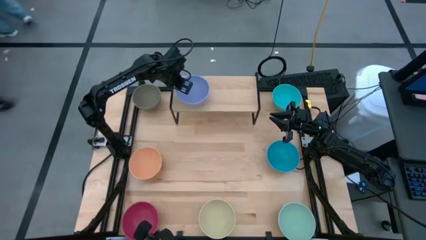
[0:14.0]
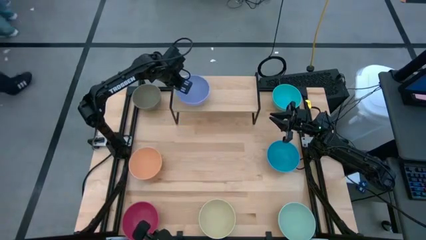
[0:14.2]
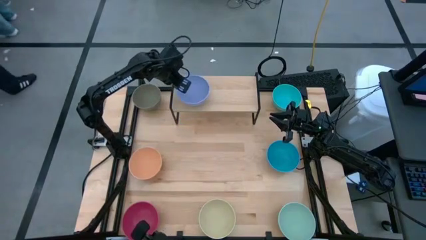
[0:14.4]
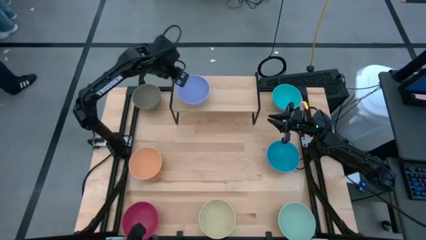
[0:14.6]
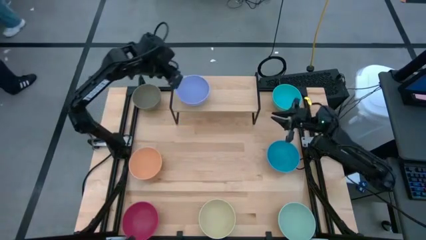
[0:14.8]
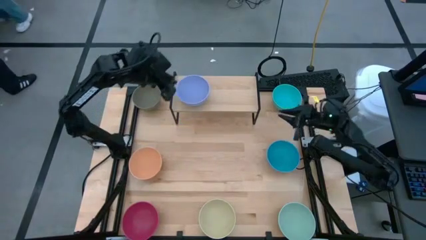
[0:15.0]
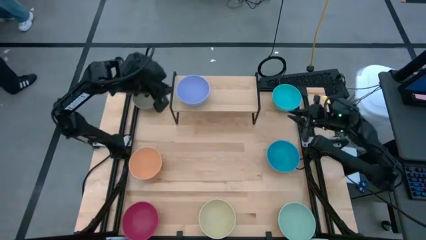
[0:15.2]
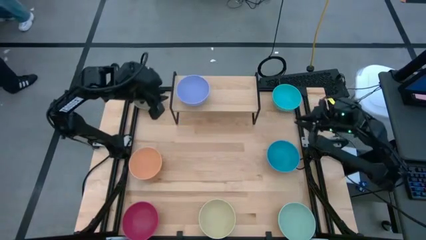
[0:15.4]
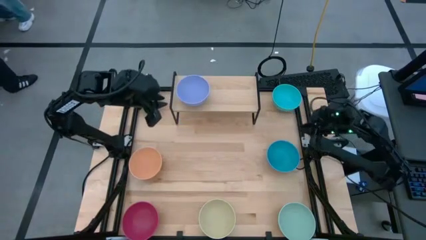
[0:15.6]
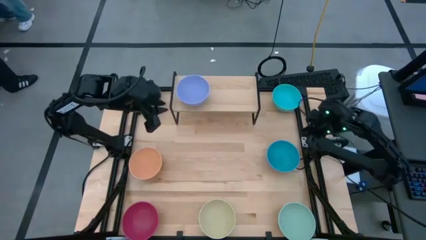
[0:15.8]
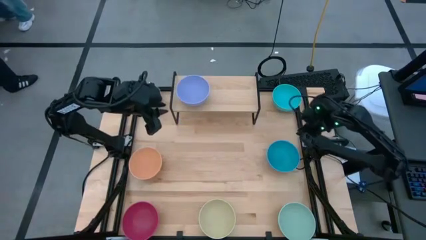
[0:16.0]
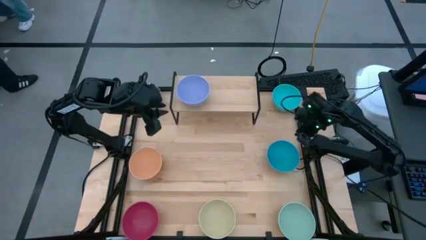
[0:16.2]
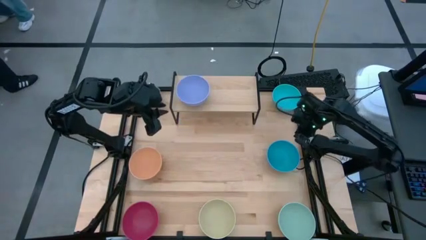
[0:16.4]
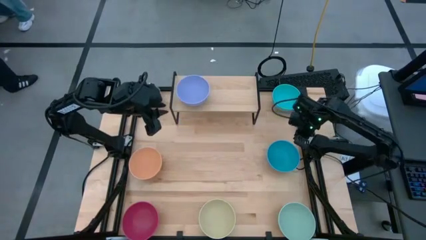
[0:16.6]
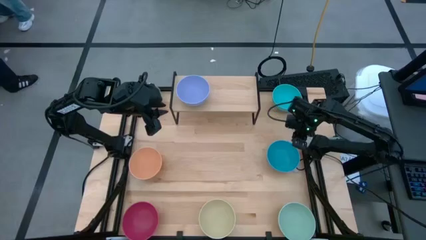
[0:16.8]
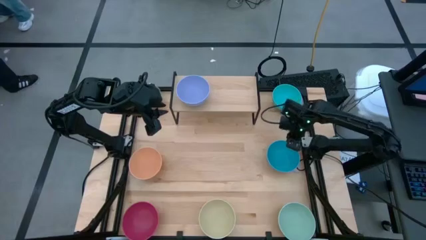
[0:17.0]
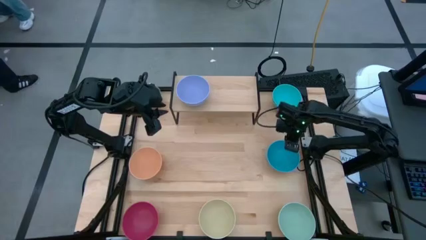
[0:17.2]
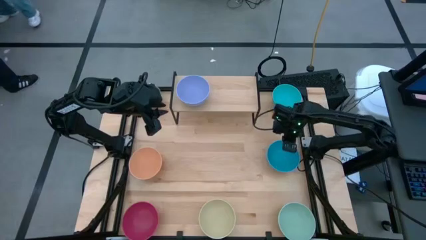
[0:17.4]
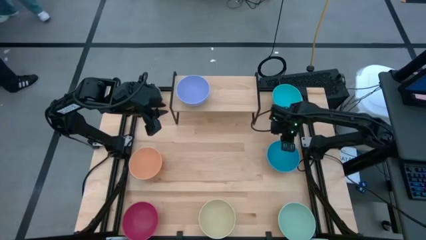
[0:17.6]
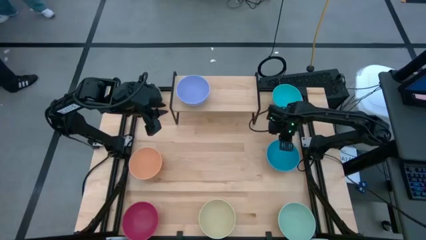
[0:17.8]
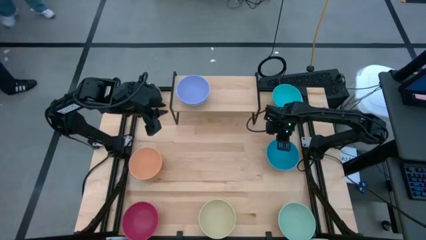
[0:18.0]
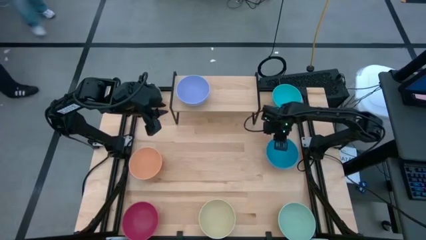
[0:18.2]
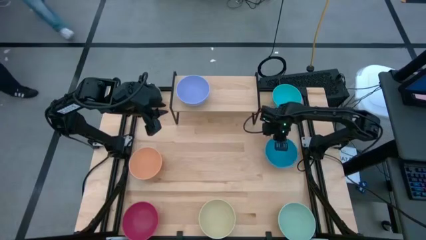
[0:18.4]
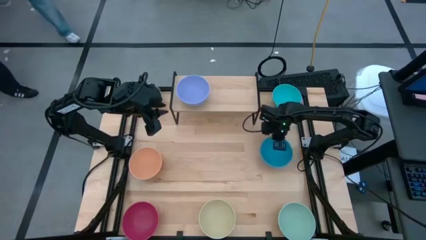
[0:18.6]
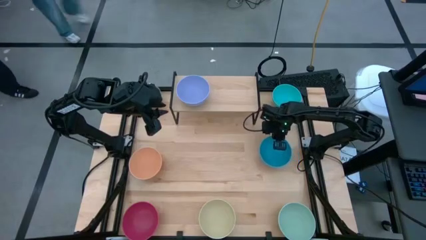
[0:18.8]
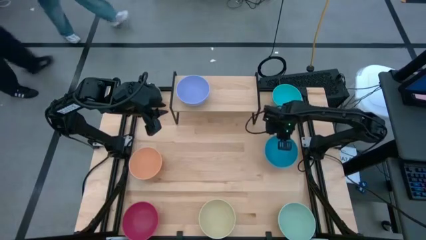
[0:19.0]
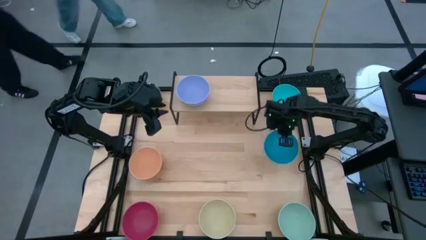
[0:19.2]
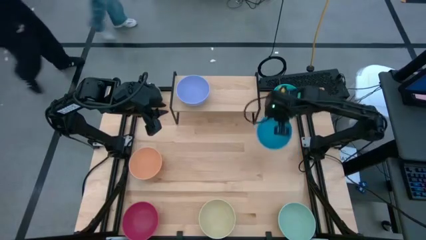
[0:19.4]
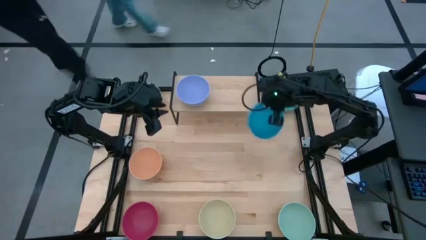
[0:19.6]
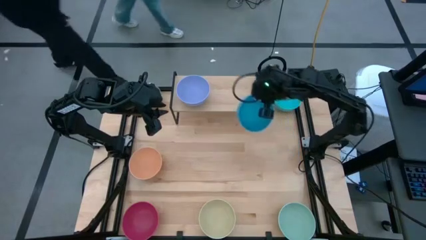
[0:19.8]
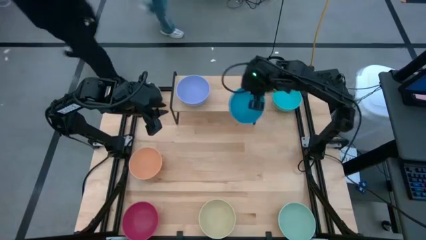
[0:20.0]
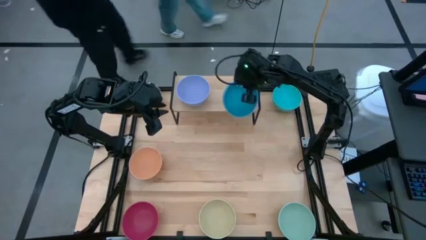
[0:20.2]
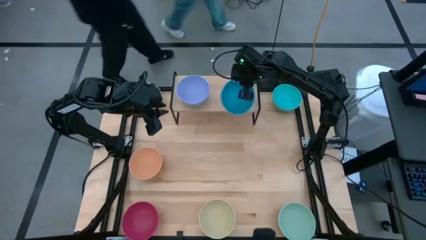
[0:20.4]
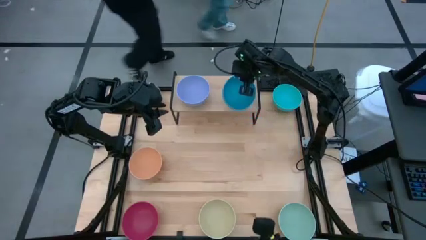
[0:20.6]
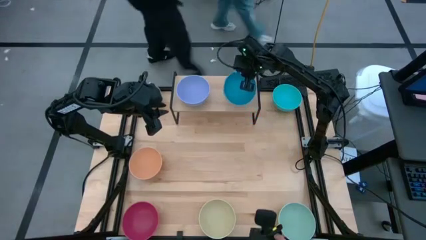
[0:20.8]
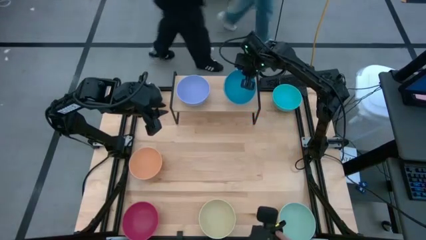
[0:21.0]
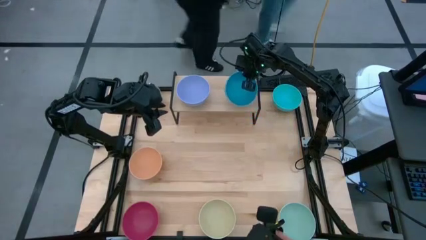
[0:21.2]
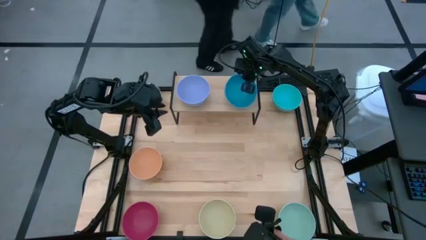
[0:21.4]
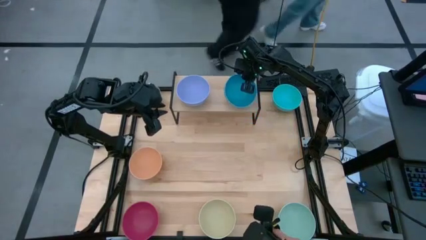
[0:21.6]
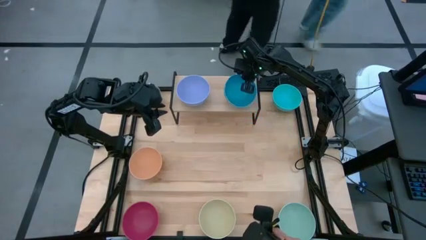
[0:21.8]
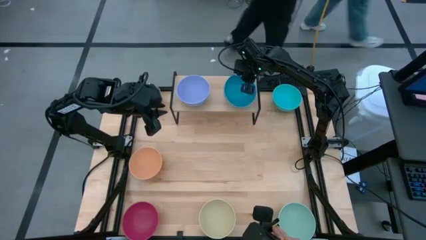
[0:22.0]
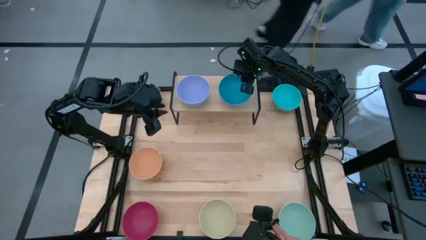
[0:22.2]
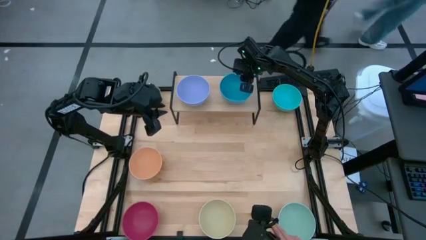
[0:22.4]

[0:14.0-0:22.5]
Task: Place and stack bowls onto a shelf
Put the blue bowl on the shelf

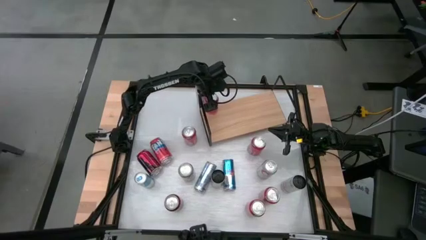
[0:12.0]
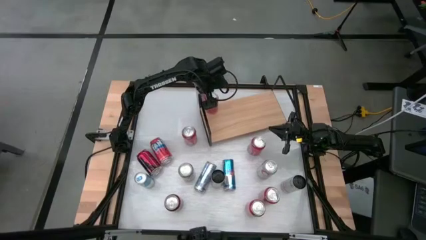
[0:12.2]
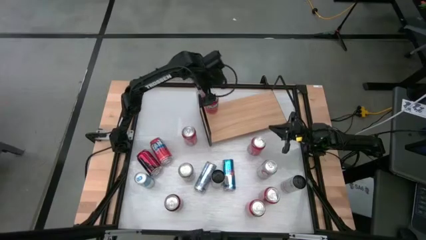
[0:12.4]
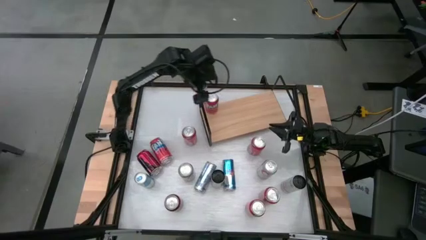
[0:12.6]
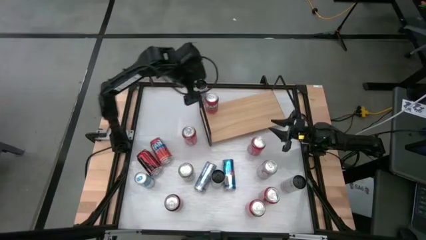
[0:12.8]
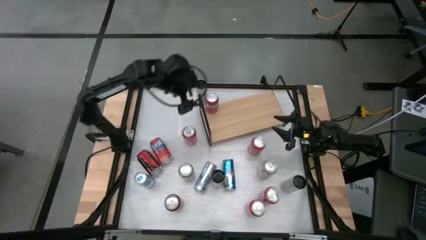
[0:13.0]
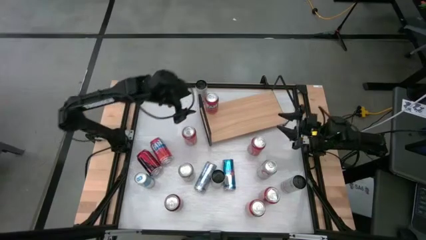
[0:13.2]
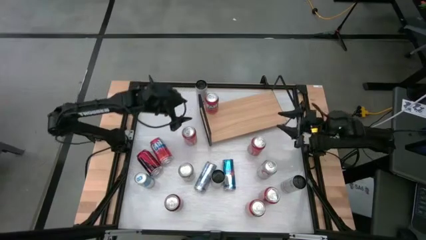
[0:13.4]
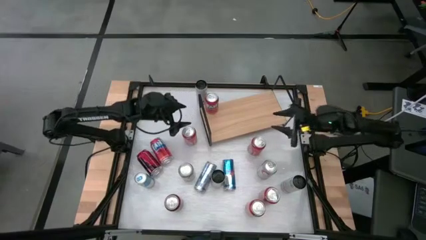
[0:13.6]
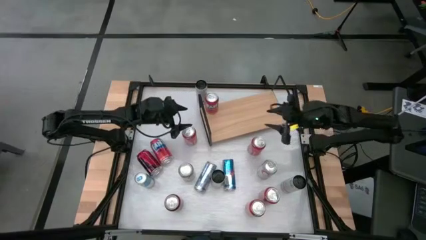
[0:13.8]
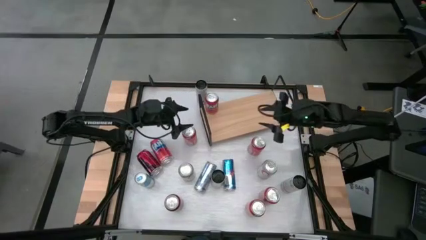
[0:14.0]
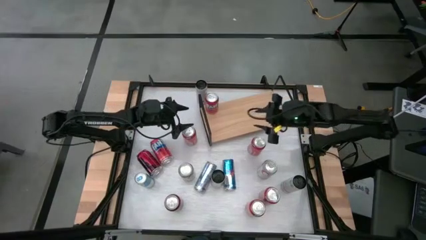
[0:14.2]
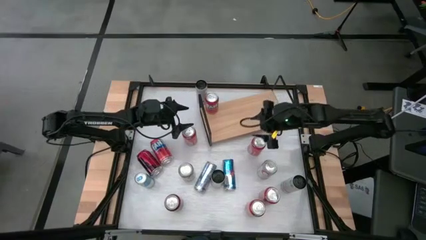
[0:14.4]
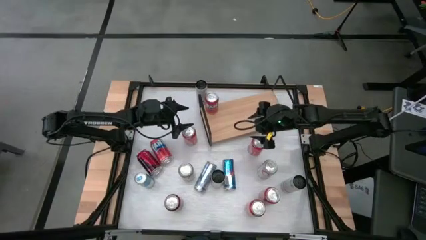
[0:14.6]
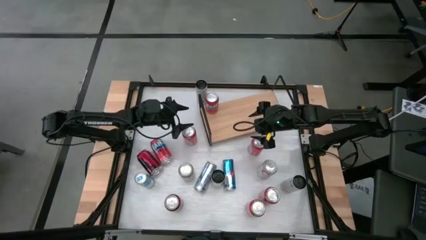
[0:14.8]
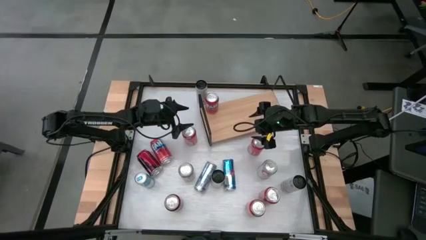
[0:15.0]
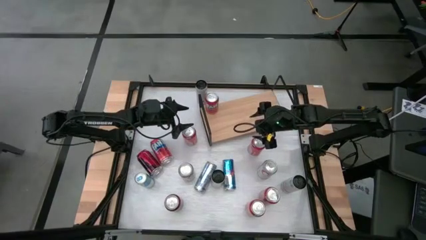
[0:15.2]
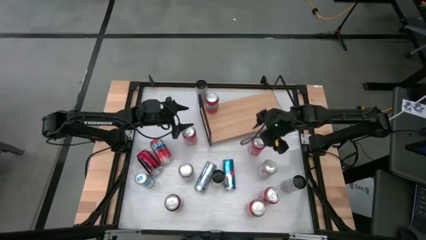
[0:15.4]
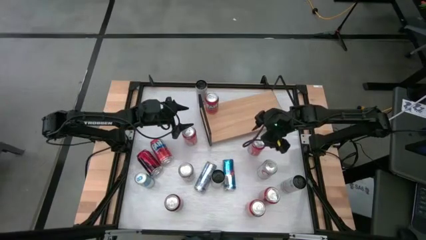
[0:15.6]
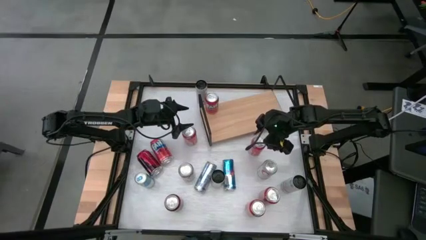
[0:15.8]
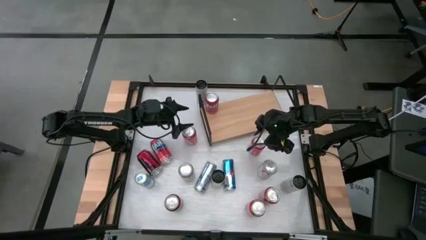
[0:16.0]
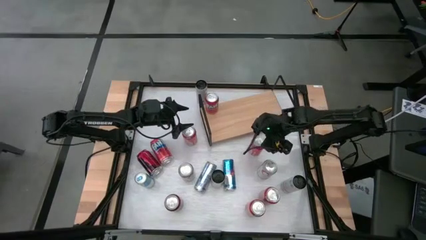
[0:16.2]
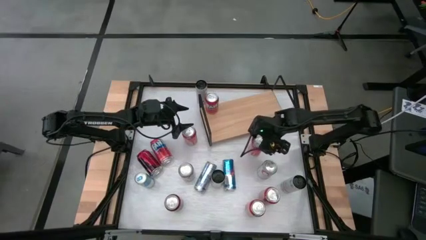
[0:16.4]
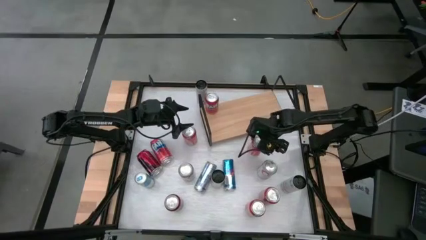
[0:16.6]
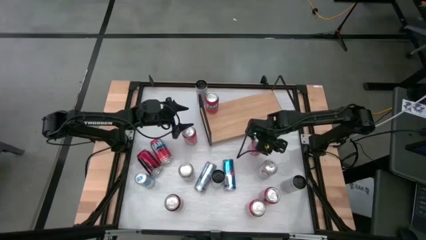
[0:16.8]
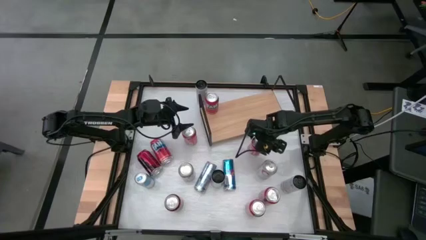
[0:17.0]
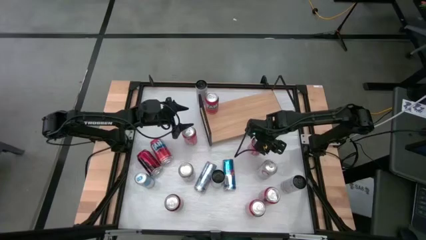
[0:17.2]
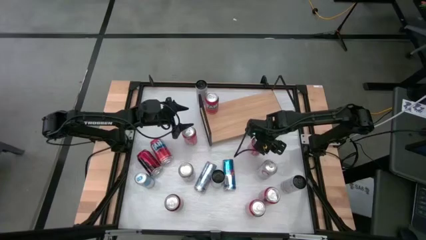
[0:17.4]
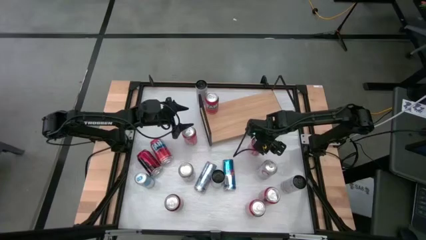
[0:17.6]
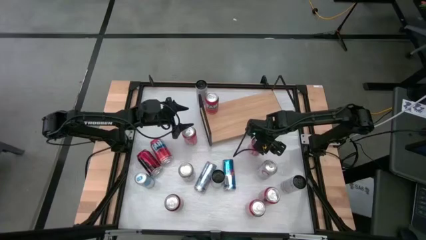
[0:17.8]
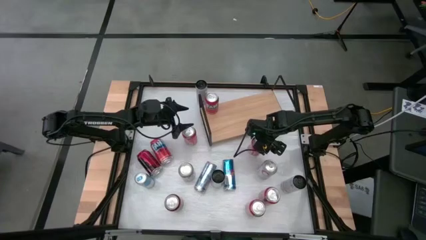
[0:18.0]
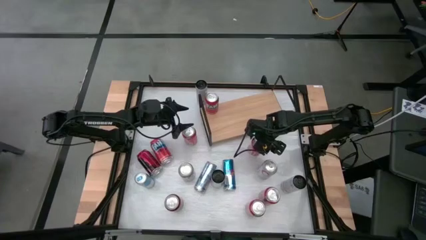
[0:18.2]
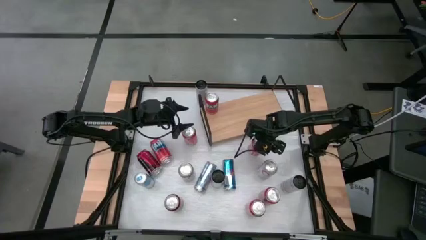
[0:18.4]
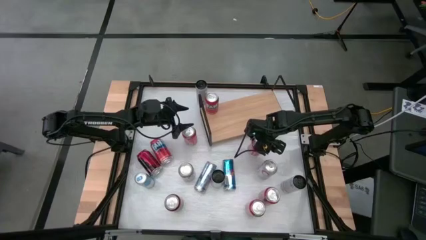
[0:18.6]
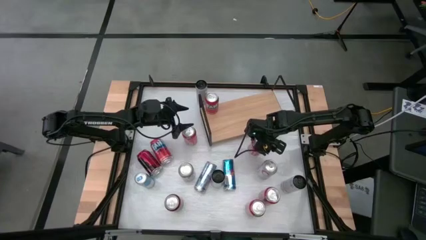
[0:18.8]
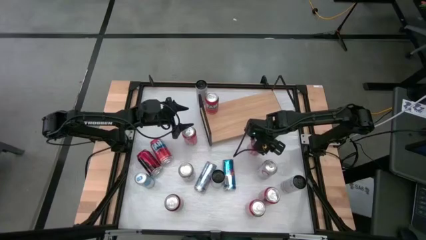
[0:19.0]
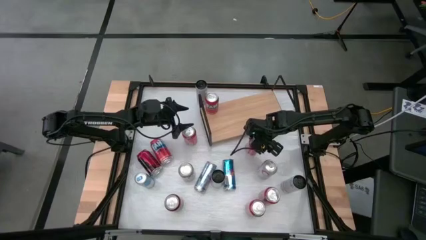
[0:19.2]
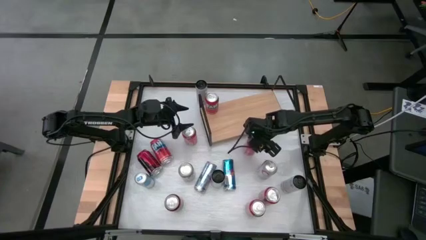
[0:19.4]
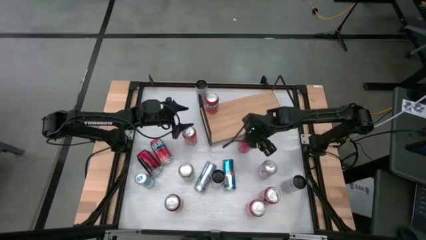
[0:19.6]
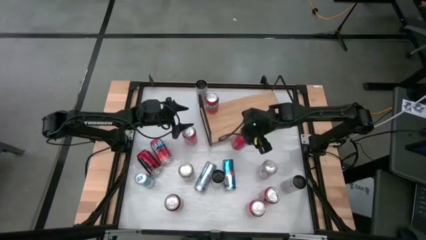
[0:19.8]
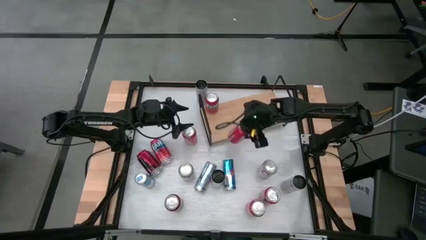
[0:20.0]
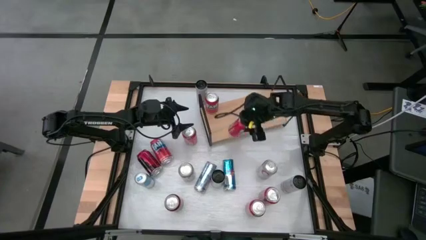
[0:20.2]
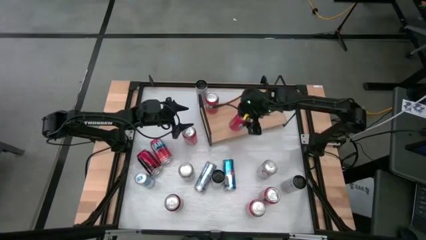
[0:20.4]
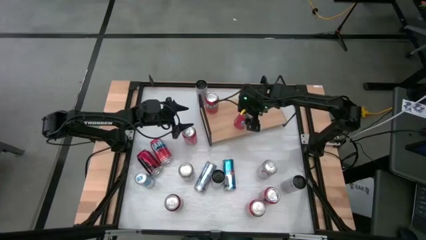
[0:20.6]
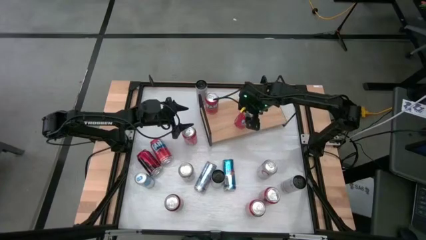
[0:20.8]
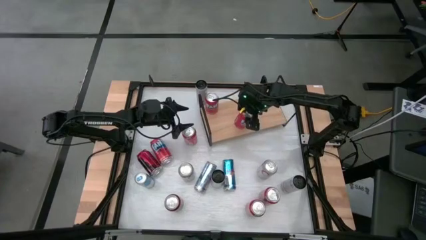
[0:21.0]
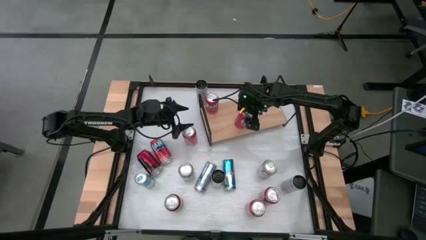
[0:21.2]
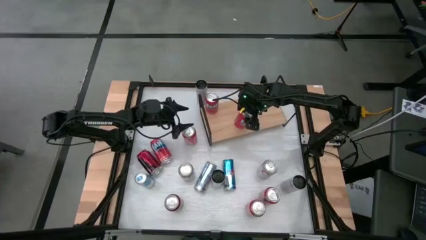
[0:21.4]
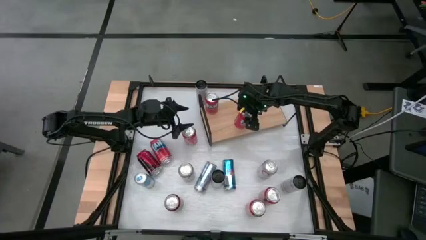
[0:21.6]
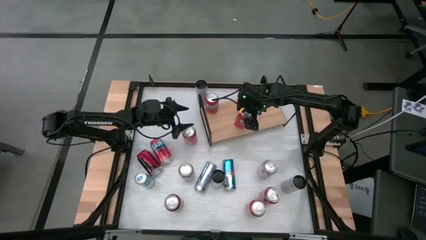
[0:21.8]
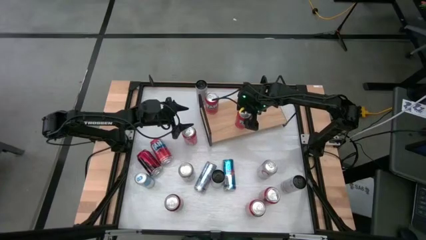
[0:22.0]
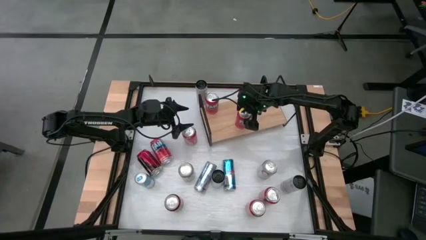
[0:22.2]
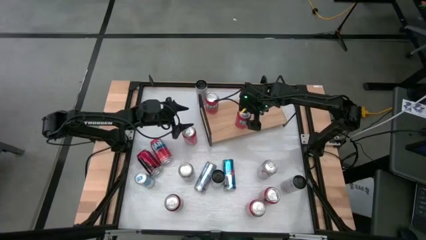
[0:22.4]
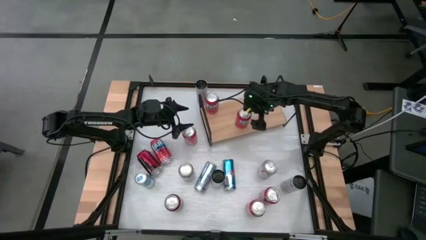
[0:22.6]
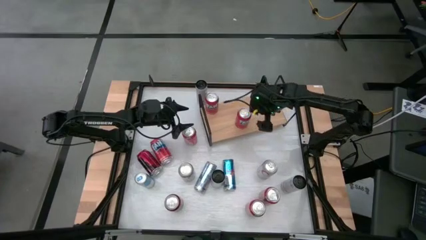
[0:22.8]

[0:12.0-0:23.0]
Task: Place canned beverage on shelf
Put the middle right orange soda can on the shelf
